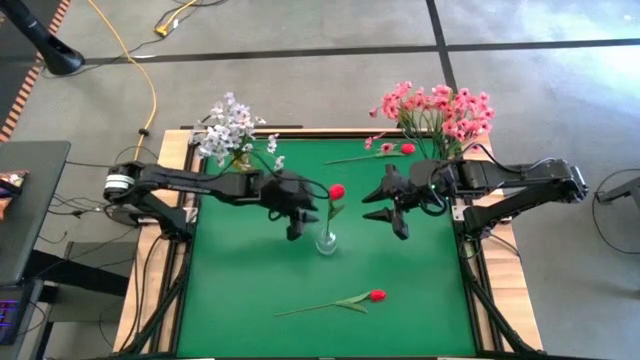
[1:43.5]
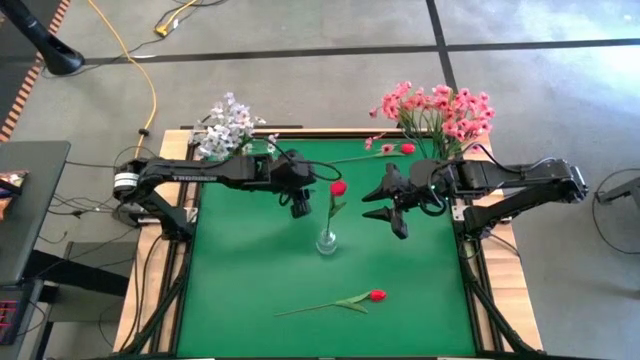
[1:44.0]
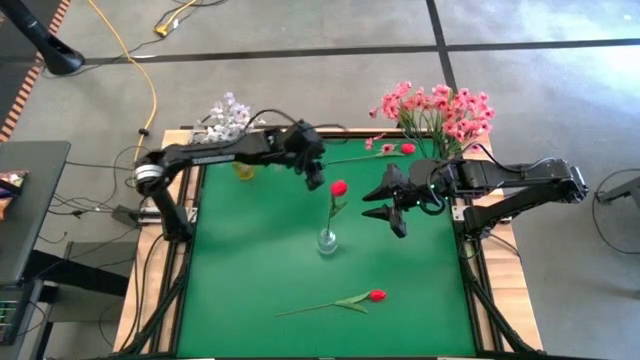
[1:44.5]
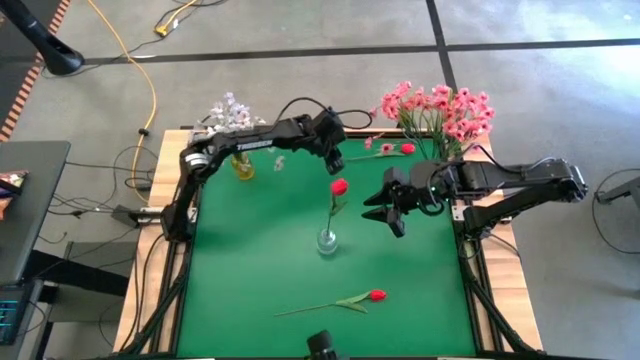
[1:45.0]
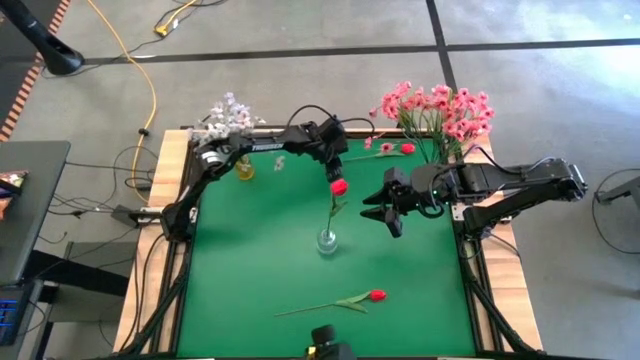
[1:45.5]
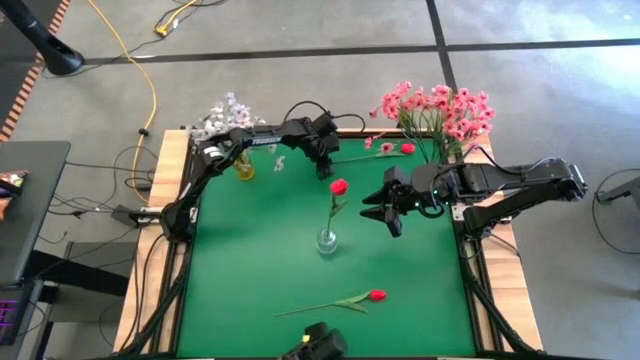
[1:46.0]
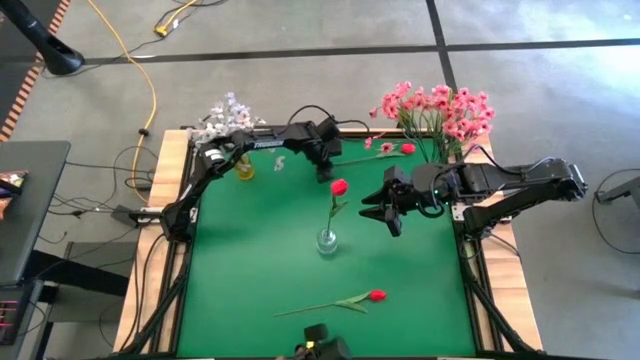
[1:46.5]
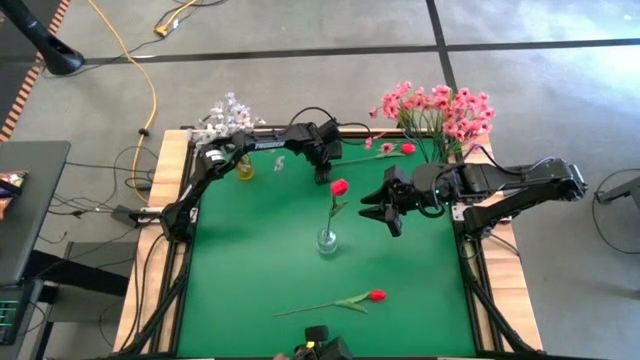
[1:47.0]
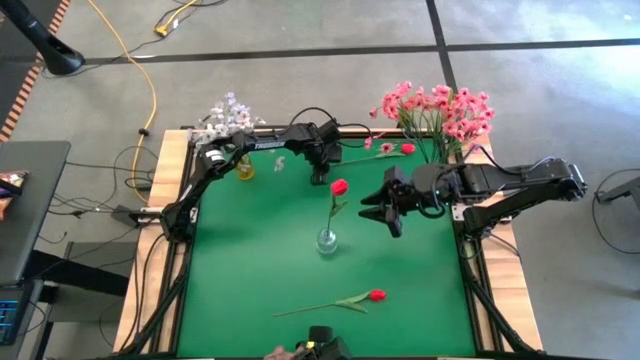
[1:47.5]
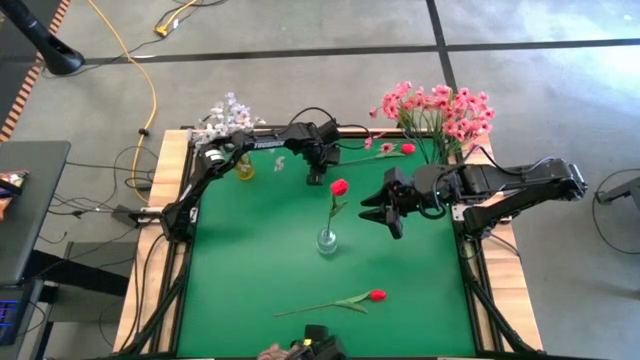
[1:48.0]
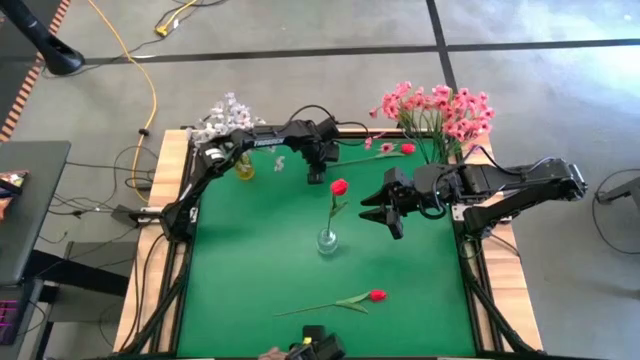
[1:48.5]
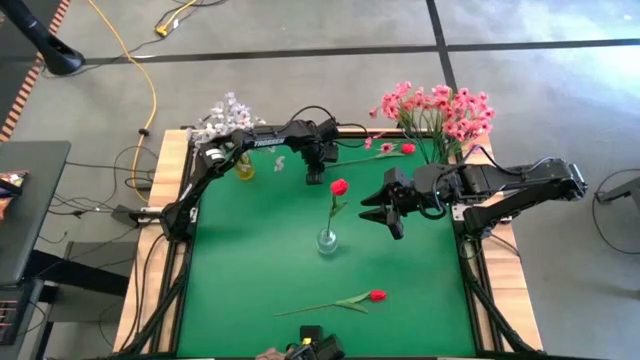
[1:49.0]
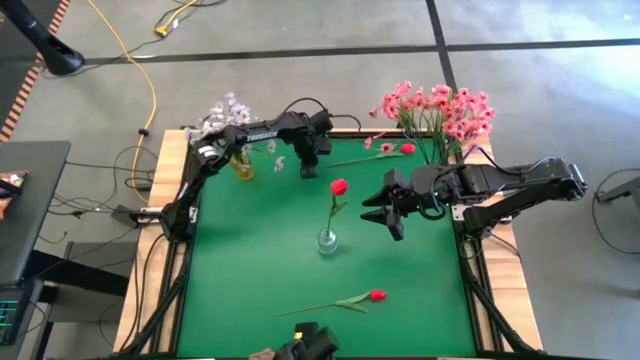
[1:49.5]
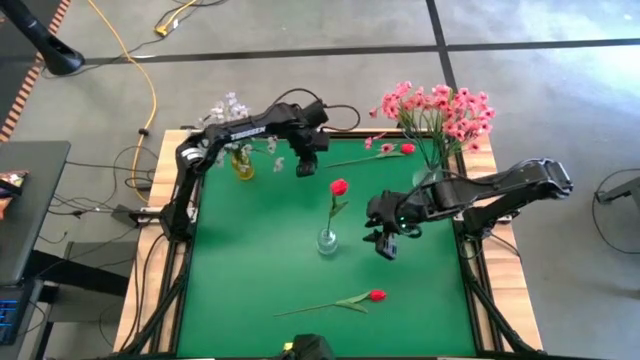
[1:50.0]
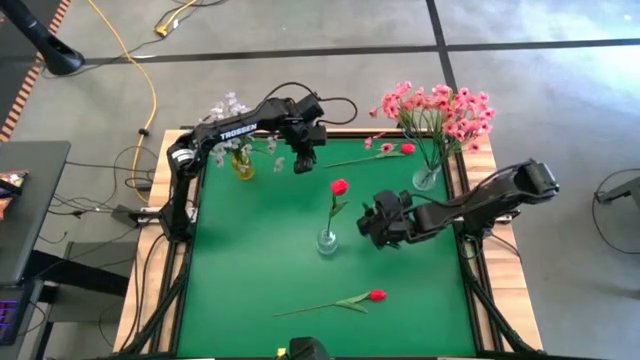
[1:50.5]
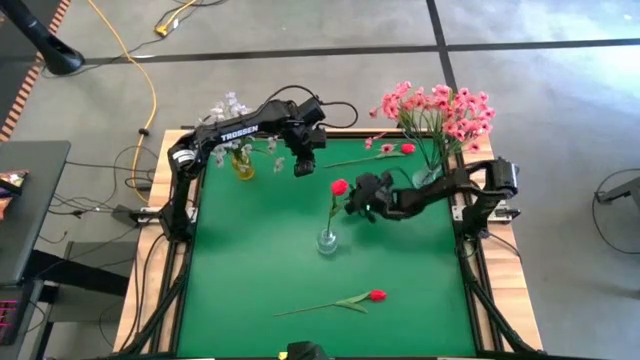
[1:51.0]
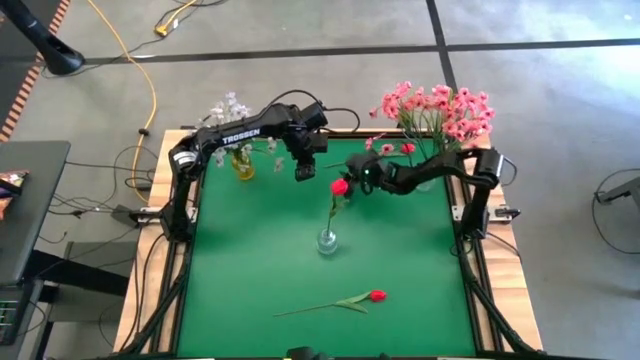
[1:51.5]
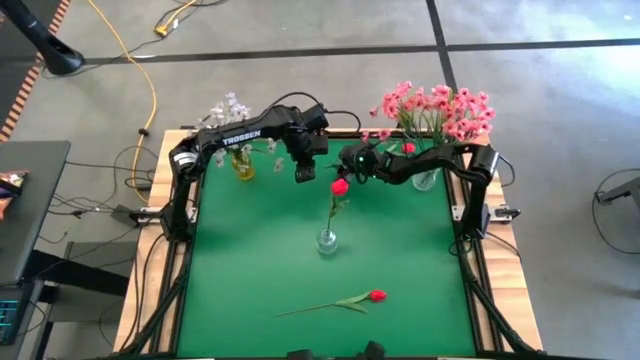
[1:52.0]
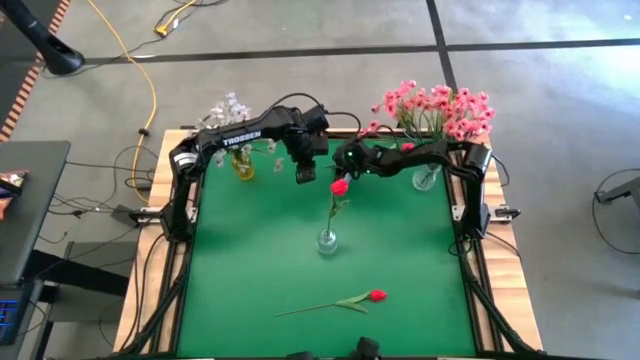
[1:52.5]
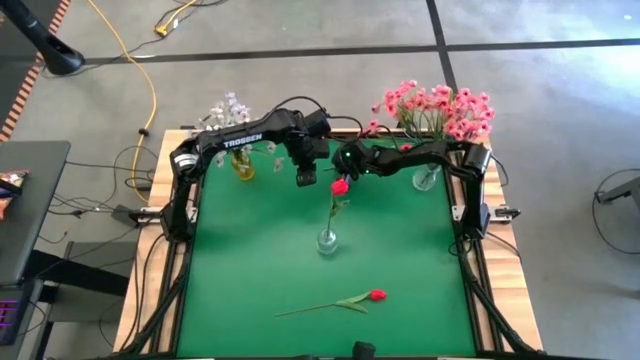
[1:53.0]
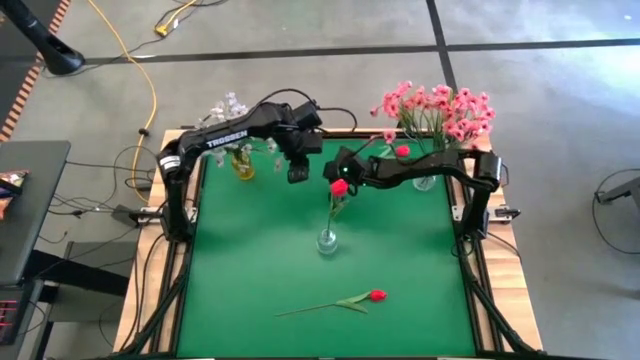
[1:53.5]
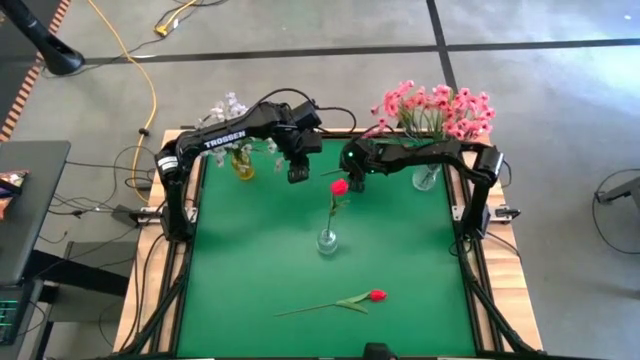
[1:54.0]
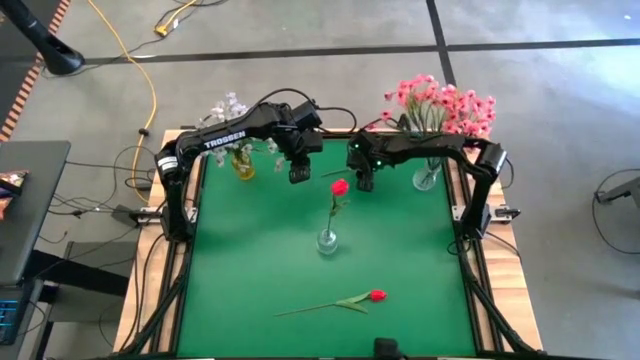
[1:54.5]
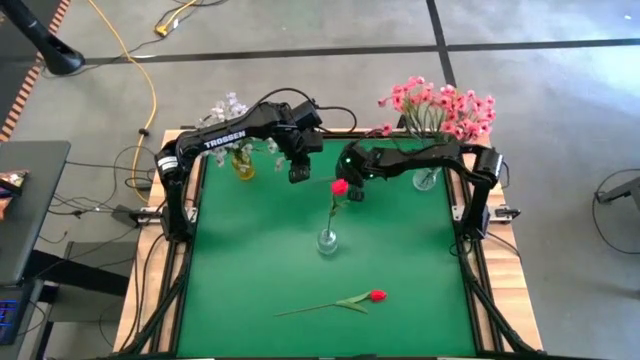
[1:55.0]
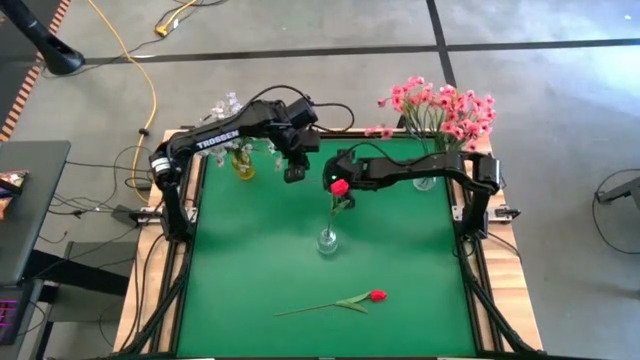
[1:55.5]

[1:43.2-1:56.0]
Task: Sort flowers into vase by color
Put the top red flower into the bottom transparent vase

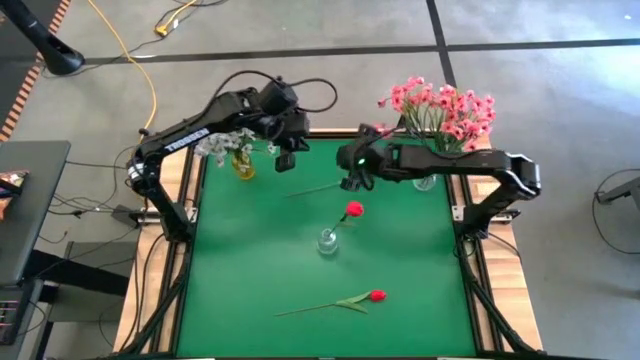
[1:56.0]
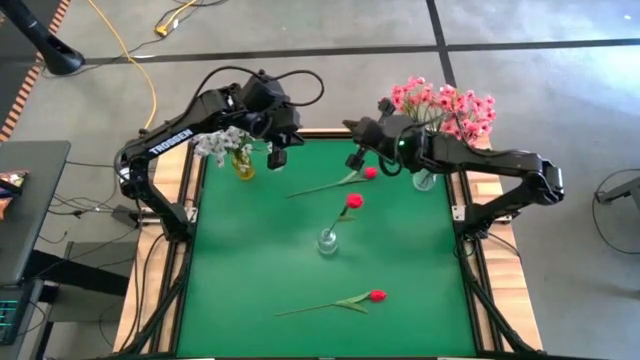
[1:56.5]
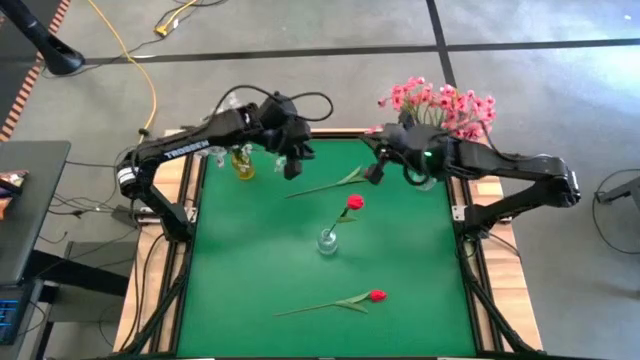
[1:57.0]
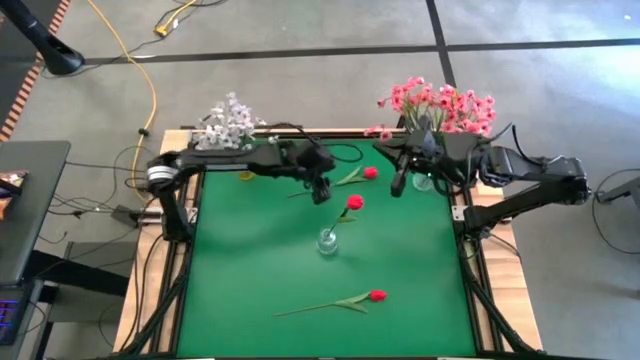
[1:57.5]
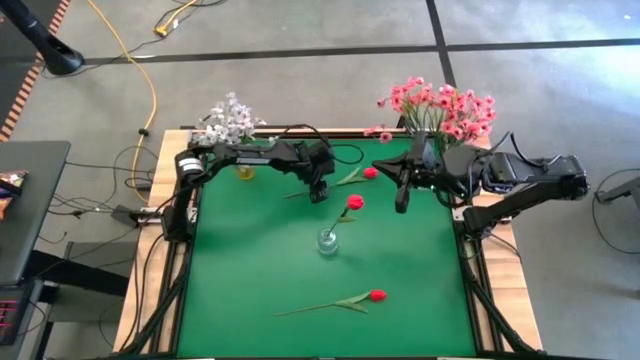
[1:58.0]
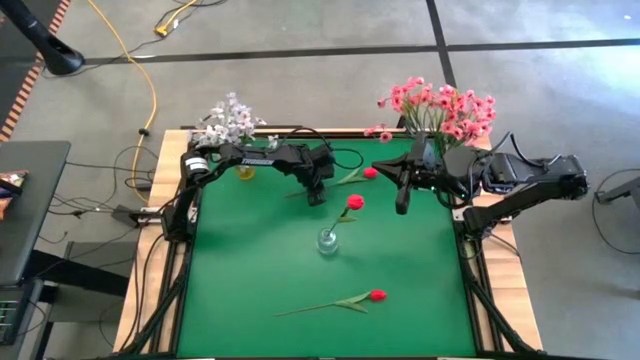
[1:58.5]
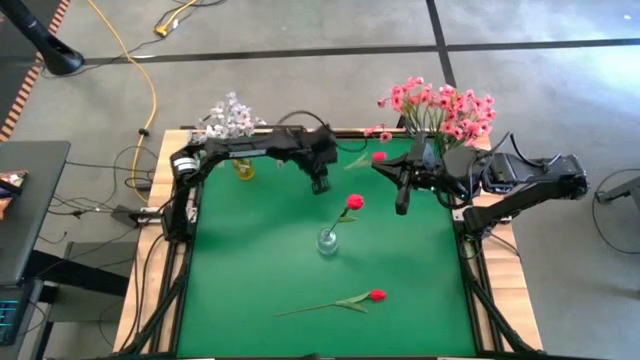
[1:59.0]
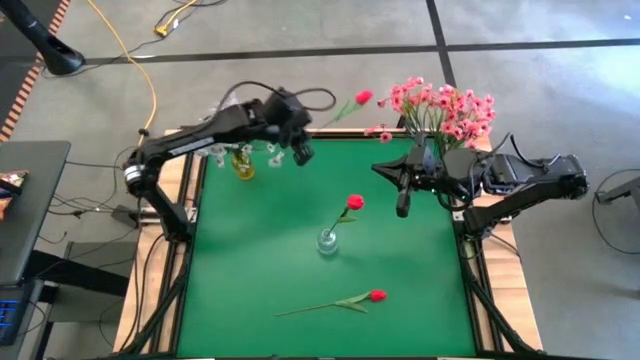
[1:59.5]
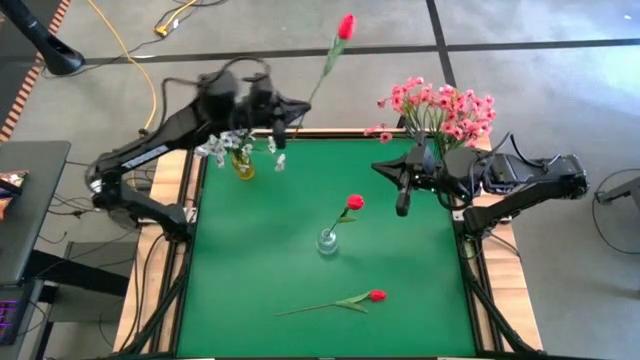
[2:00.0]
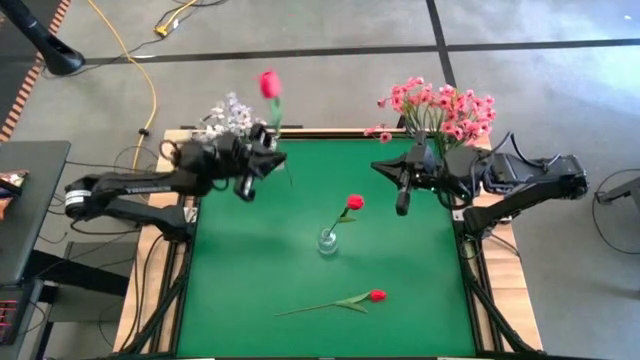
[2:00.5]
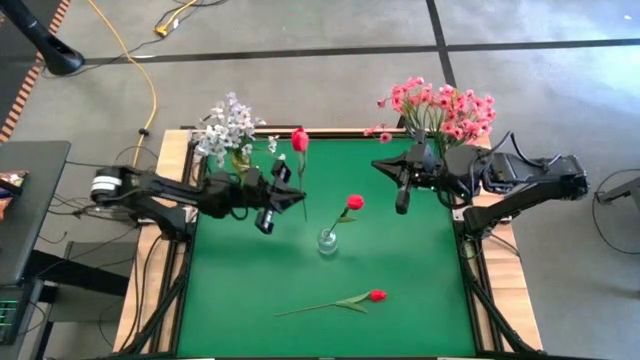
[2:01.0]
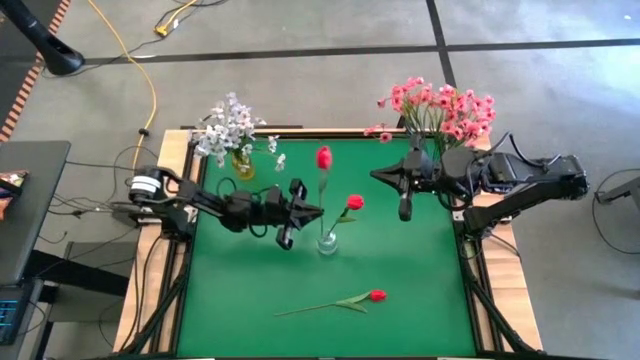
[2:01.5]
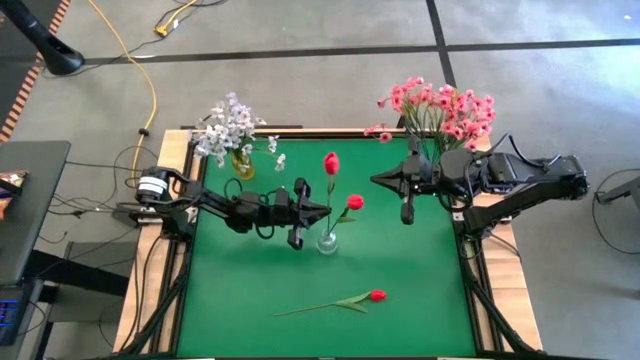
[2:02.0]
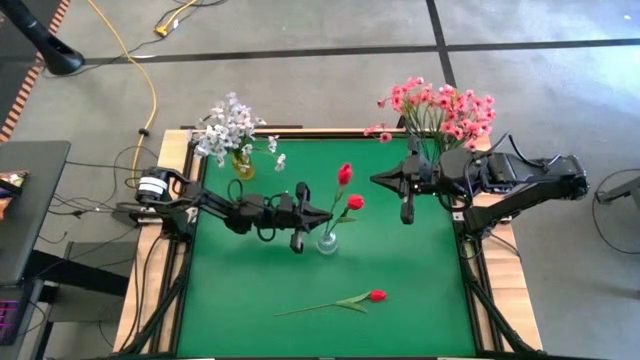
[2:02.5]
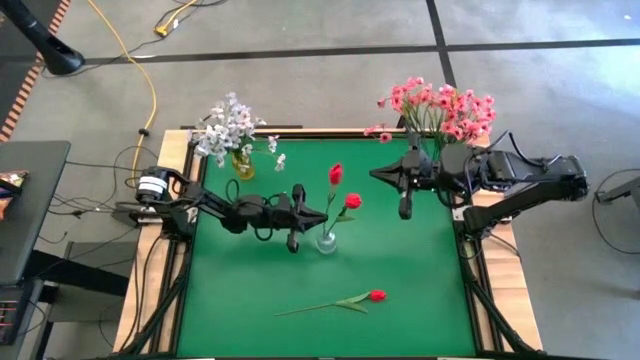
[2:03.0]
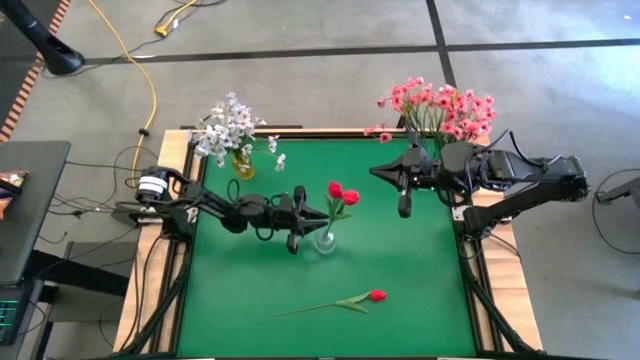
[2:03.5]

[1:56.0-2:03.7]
Put the top red flower into the bottom transparent vase
